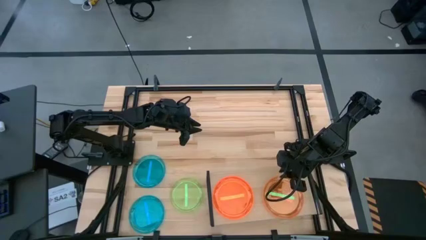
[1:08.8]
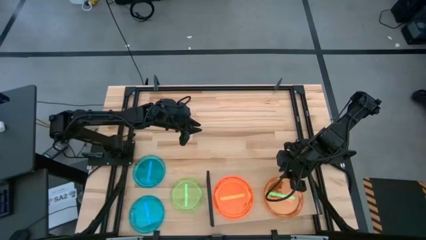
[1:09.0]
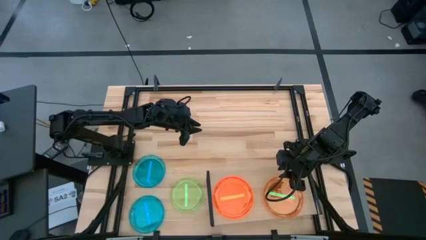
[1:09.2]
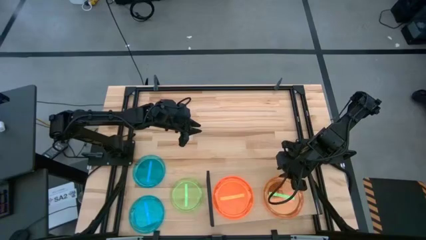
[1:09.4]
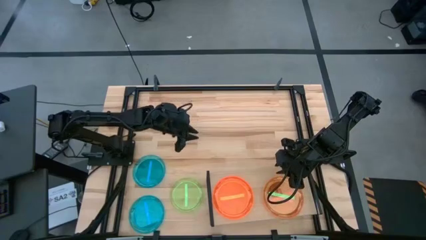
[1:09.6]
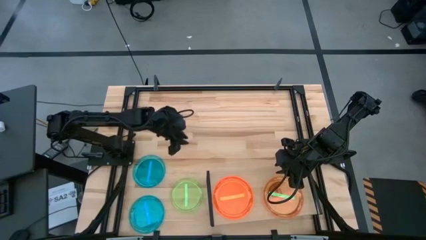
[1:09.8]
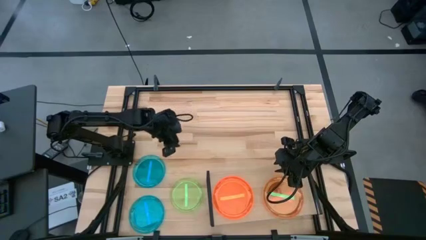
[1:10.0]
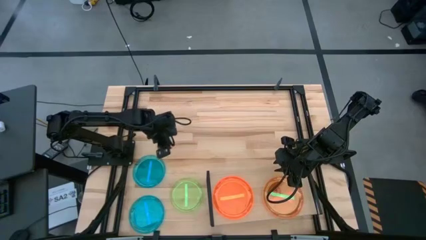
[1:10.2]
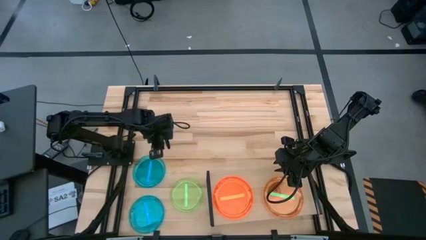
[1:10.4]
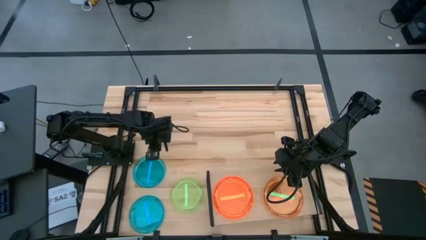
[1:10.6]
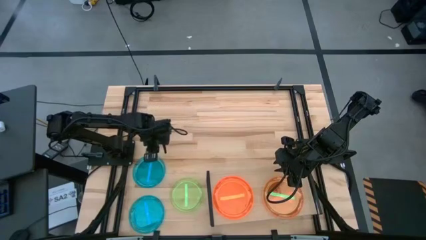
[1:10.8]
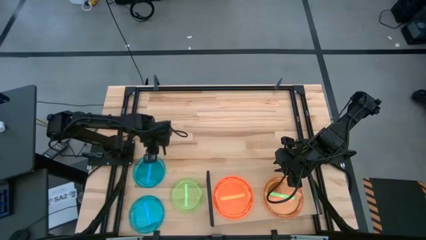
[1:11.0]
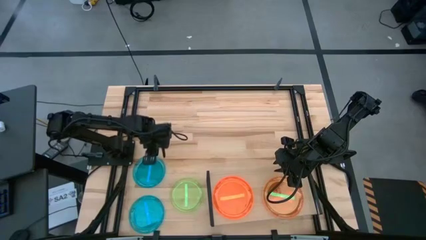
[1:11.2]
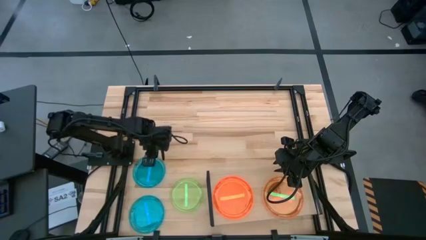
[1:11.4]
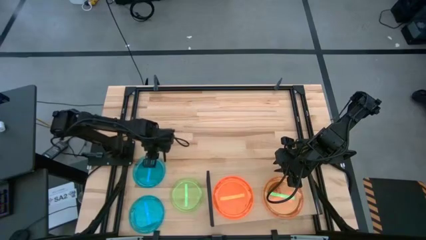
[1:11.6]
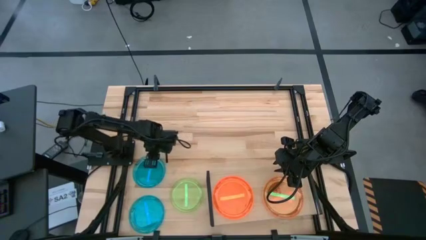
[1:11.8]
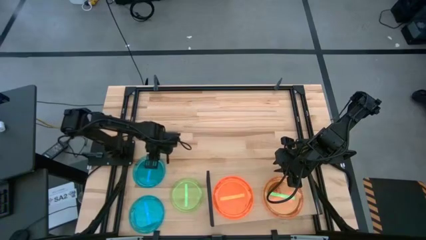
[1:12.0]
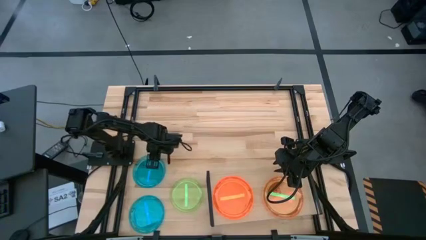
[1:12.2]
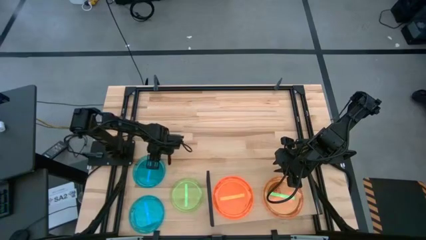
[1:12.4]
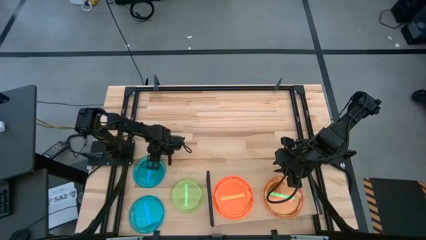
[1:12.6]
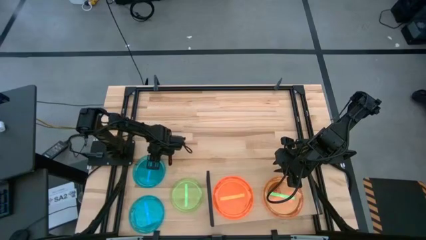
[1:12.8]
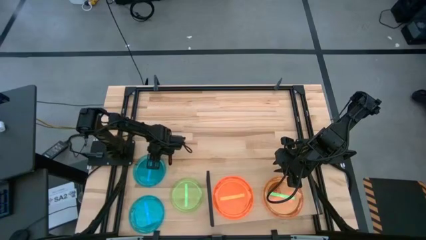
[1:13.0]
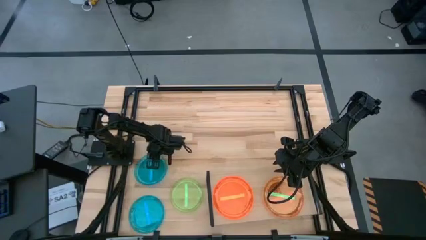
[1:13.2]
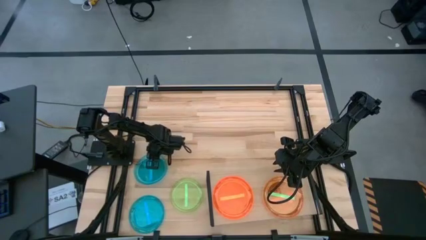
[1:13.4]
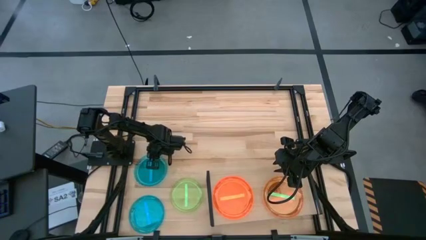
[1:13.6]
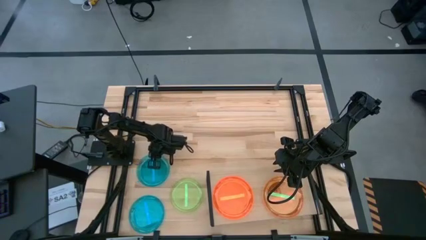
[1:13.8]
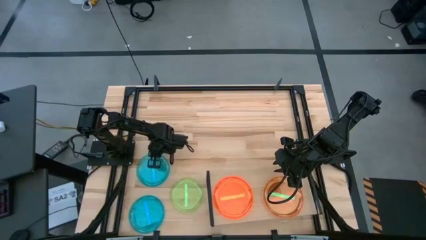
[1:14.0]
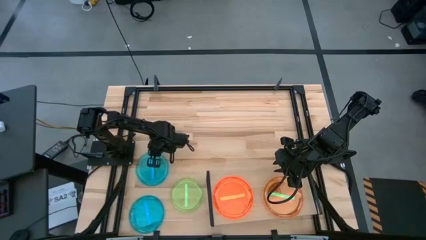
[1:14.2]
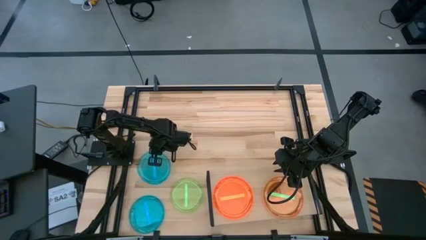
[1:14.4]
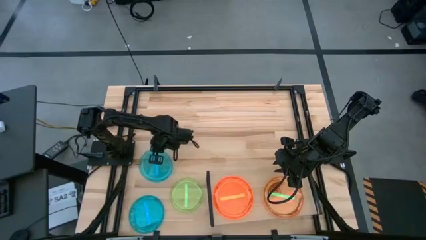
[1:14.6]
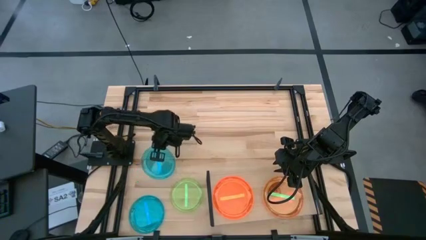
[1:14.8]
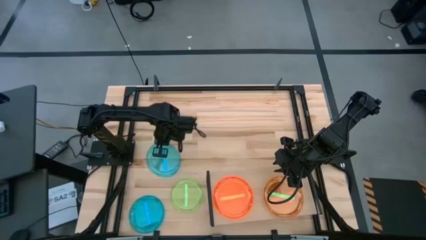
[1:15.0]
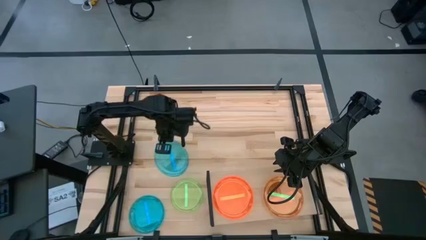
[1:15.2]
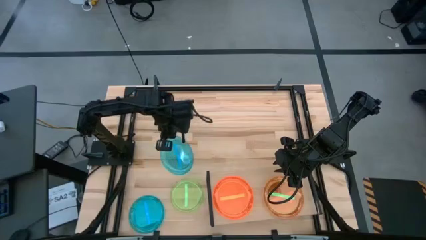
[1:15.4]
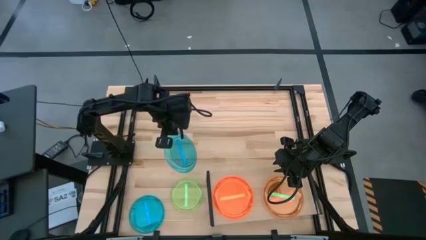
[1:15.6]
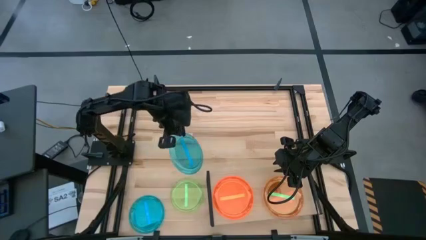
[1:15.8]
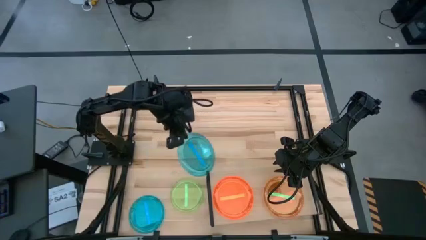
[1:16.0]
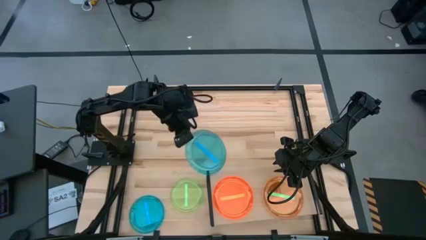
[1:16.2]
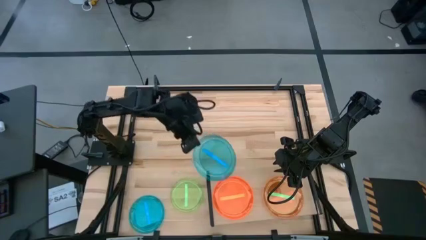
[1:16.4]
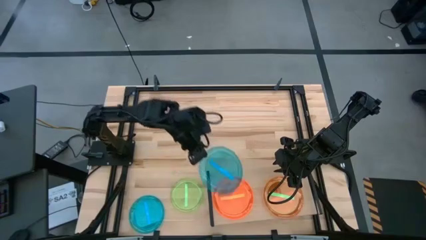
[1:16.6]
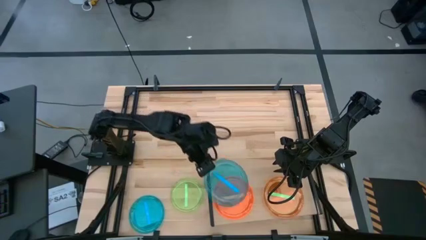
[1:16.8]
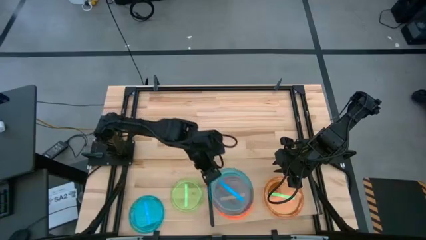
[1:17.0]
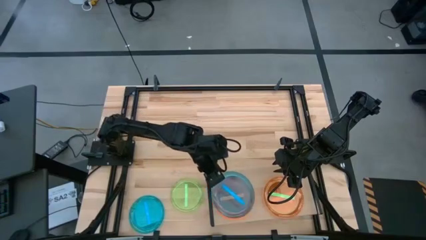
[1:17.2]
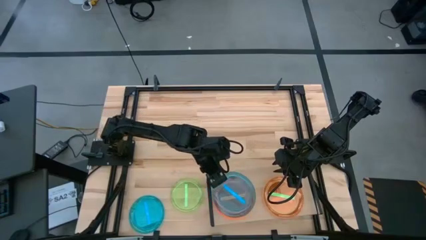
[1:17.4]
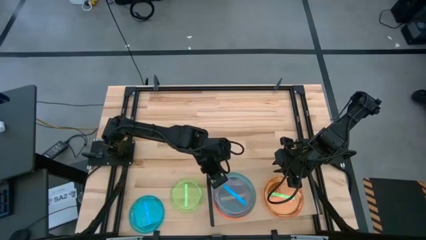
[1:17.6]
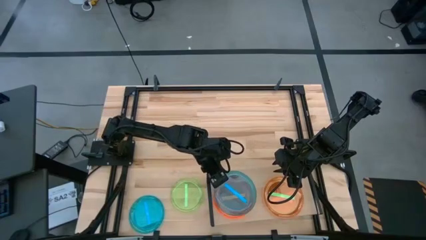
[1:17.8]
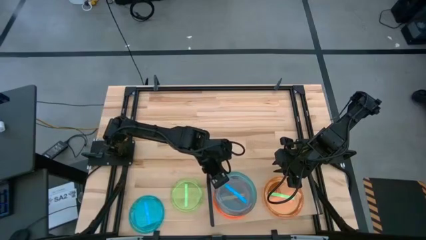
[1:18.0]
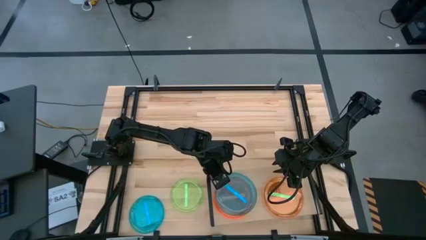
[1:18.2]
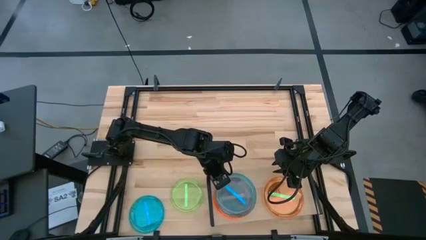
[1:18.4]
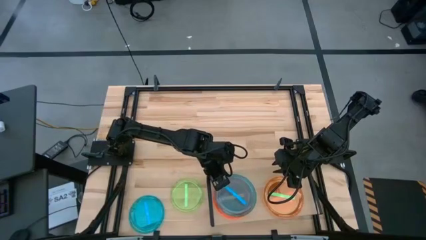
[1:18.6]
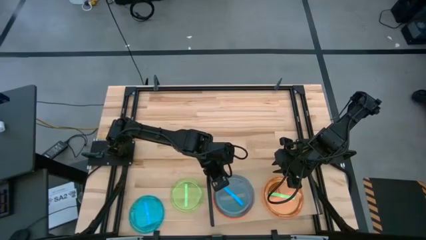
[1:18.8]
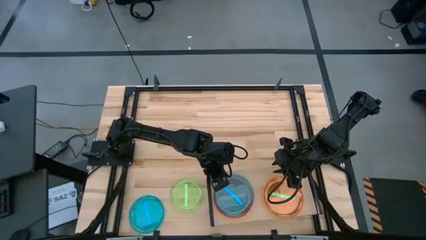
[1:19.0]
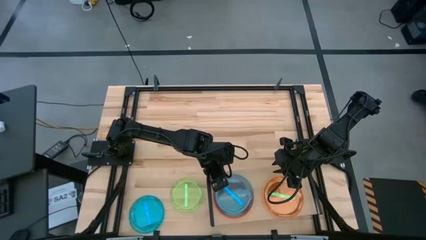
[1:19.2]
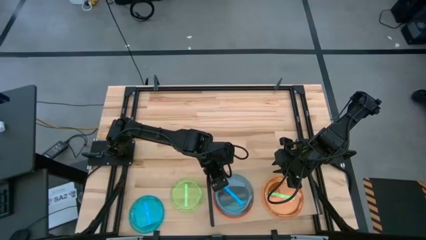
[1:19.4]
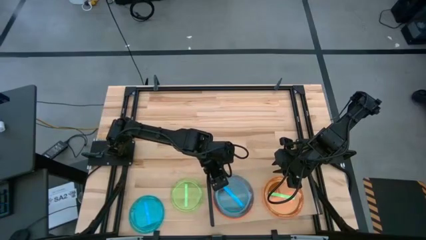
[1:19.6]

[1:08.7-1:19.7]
Task: Place and stack plates onto a shelf
Stack the top blue plate on the orange plates on the shelf
